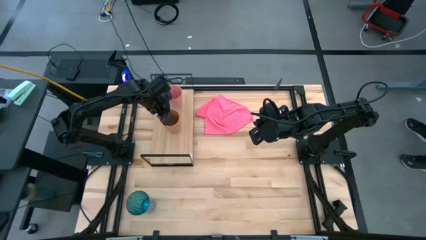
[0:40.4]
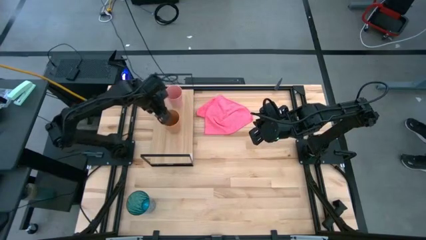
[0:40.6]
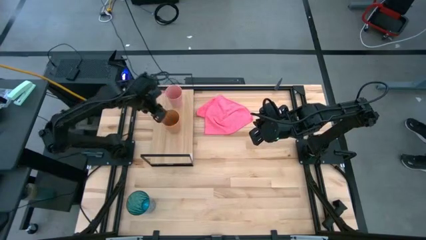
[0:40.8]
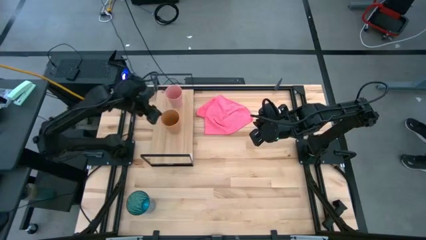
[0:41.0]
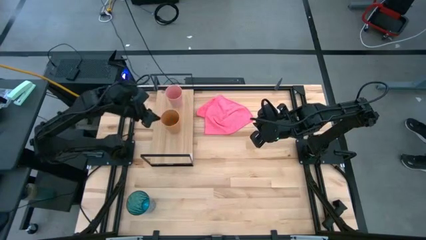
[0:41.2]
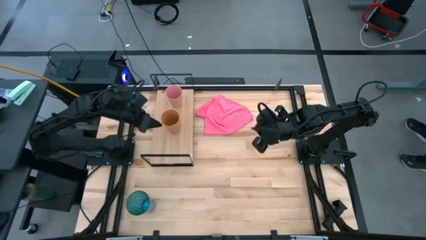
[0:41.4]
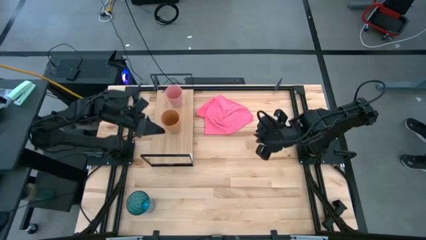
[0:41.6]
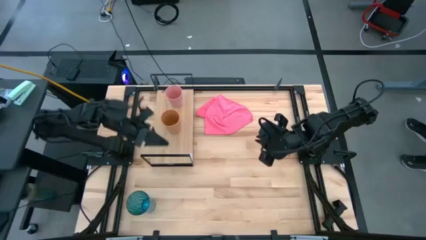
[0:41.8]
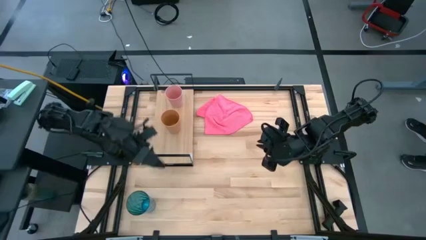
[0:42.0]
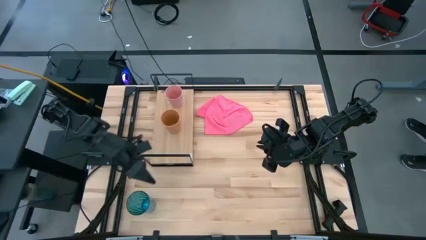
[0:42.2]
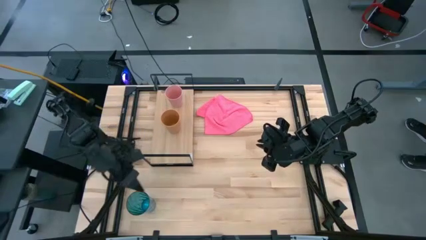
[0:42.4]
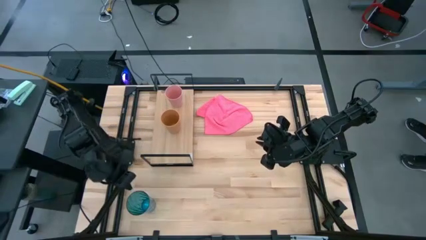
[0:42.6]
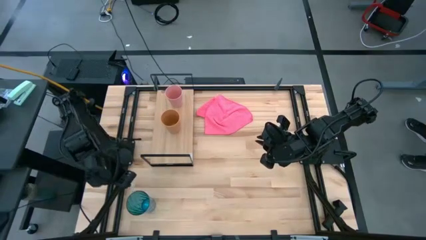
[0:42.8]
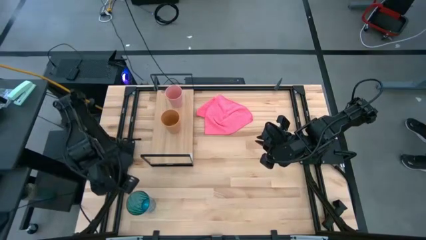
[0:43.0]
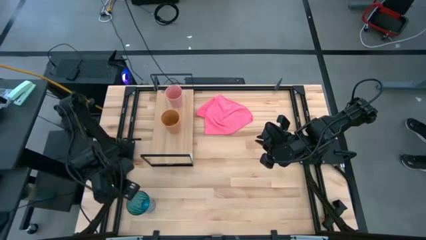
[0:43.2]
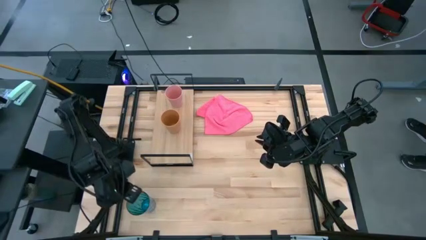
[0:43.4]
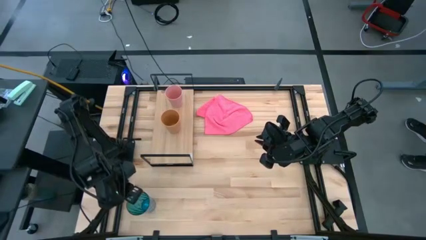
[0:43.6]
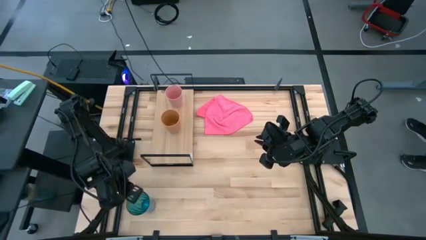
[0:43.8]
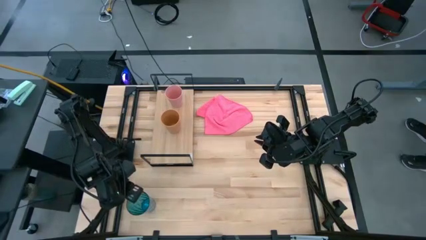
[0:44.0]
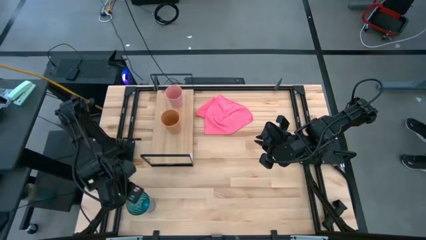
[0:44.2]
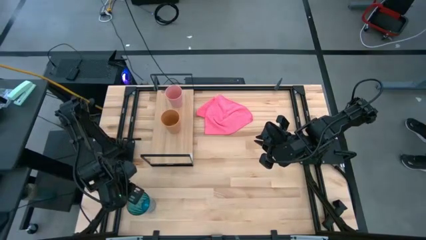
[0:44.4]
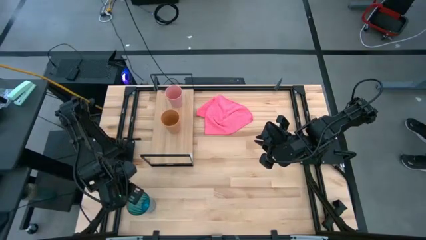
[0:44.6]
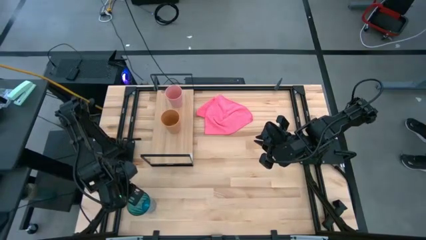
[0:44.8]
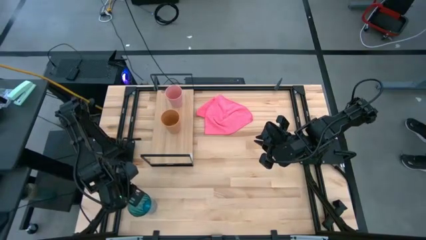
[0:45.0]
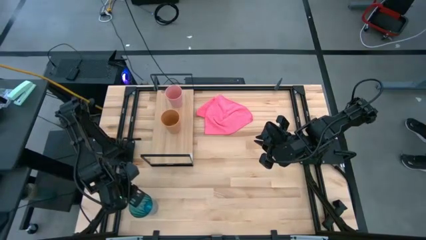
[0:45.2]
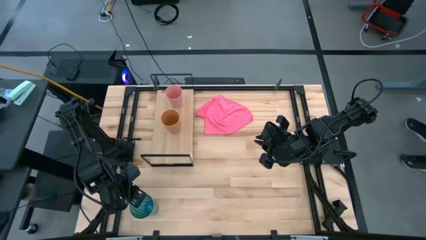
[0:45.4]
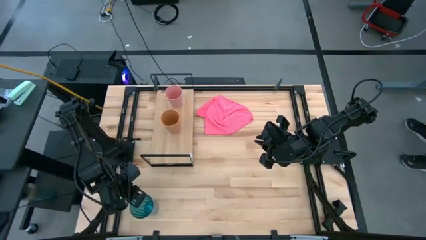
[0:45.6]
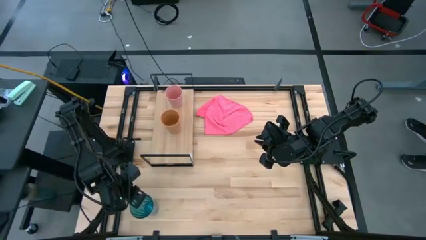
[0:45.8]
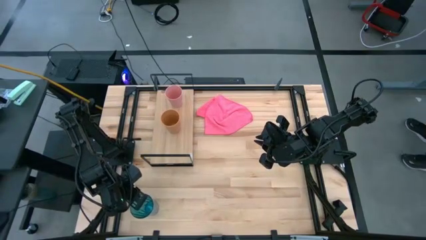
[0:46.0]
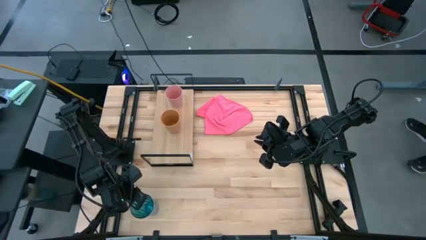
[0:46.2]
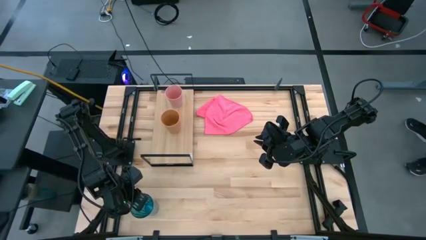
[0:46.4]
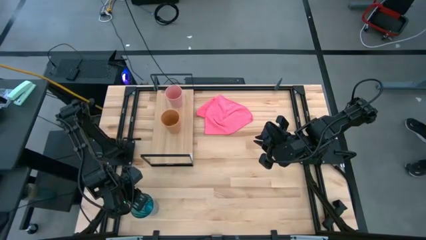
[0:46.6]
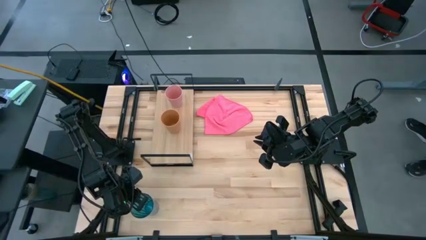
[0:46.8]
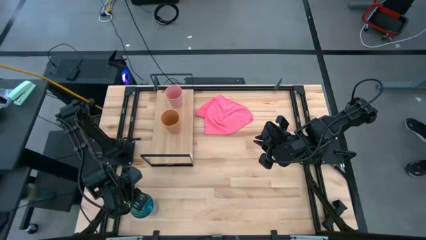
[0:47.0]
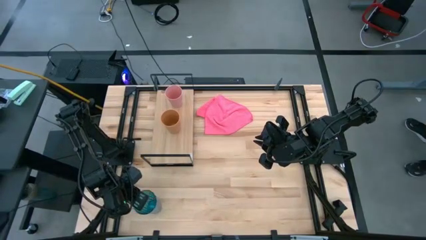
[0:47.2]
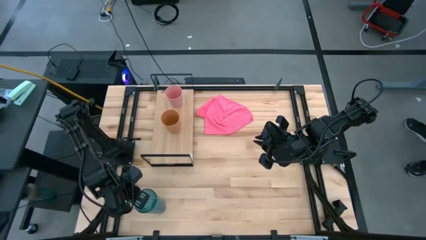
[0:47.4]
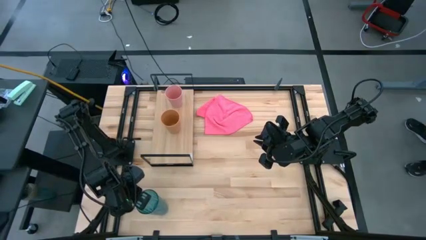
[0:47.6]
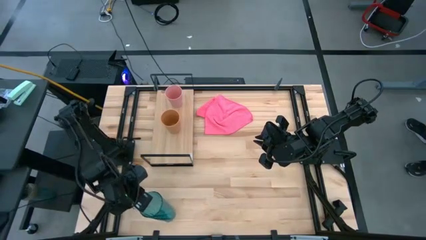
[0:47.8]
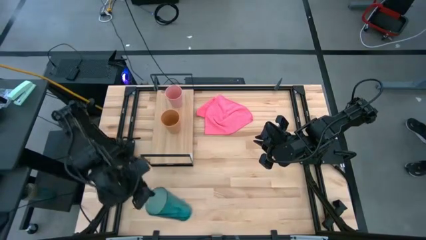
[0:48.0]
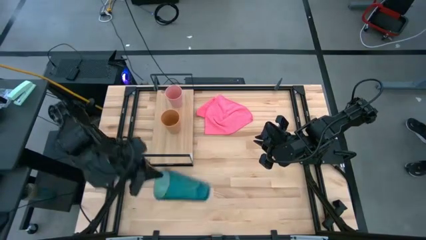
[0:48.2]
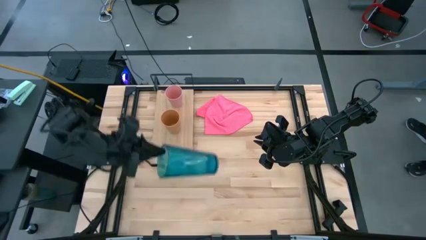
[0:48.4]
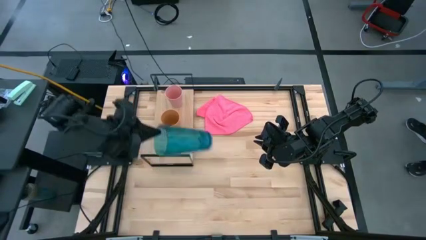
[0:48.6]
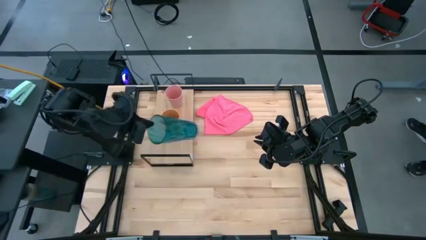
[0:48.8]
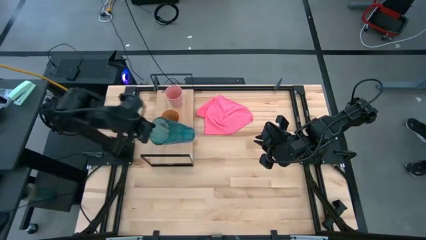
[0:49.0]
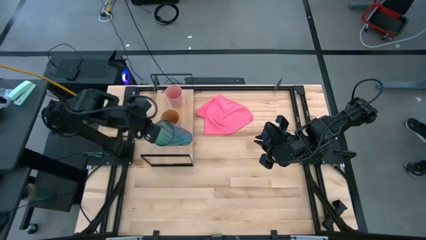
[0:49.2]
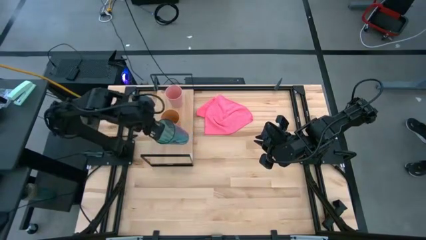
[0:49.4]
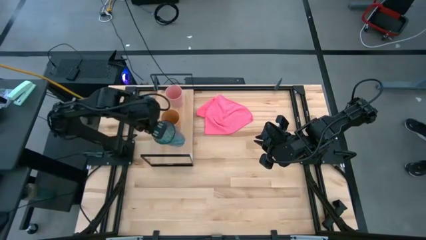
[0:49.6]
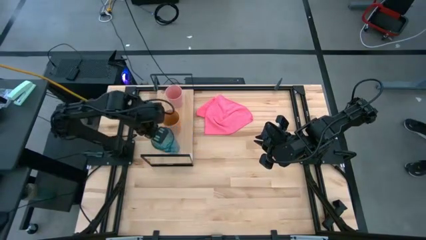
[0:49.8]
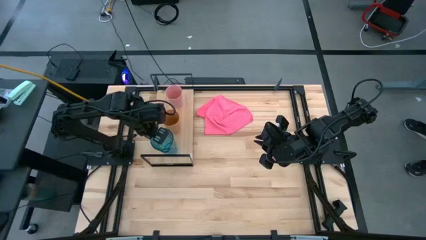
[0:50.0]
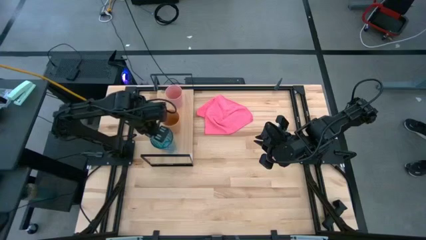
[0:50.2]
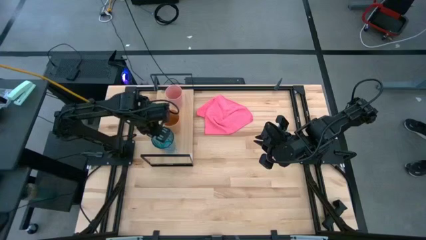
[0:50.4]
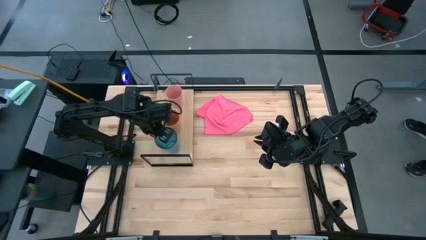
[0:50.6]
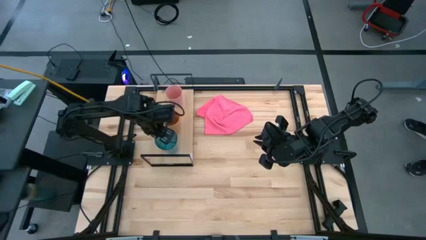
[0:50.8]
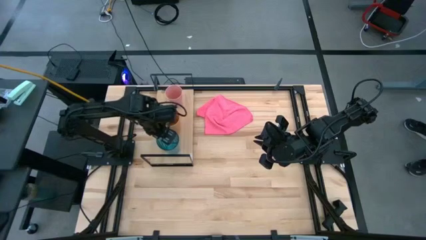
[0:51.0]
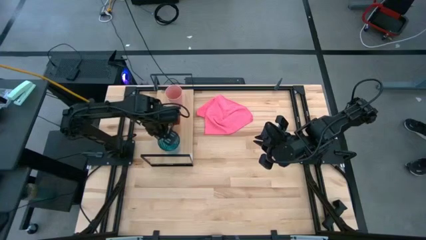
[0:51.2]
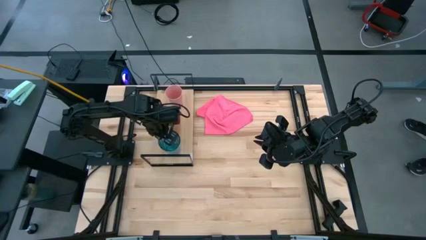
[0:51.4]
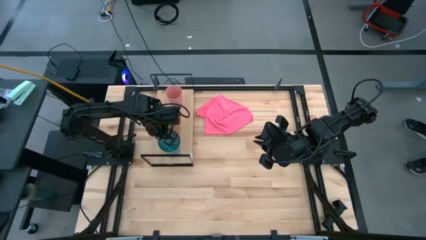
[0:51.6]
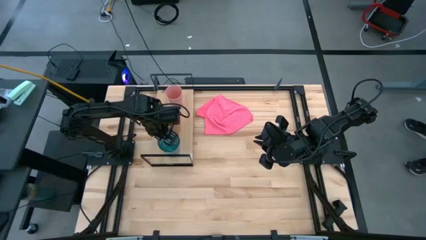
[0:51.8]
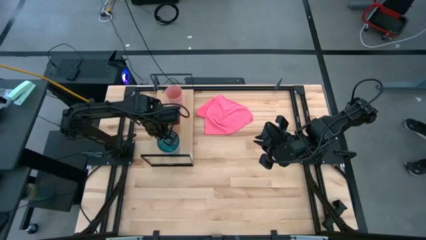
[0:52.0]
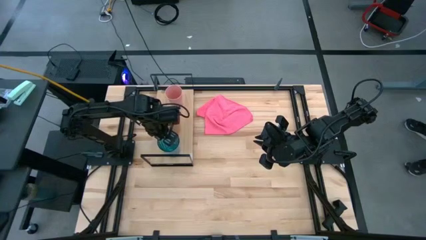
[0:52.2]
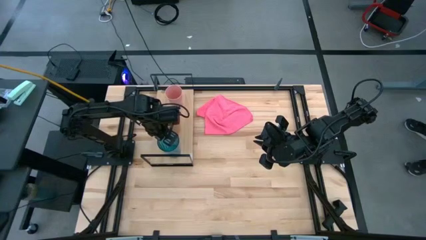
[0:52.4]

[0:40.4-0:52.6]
Task: Stack small to large cups/mugs on shelf
Put the blue cup on the shelf
